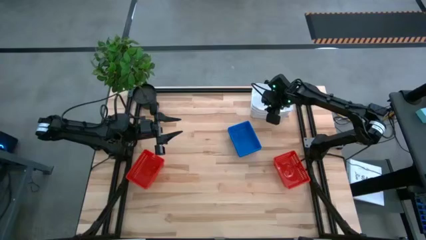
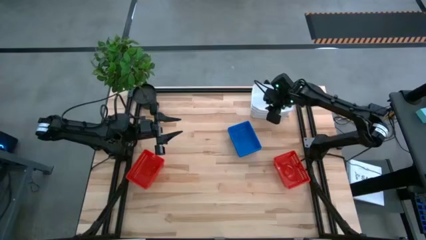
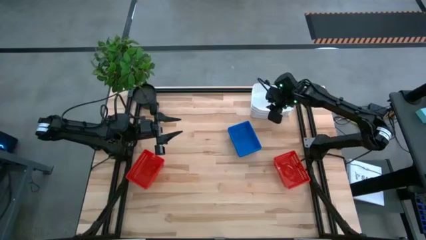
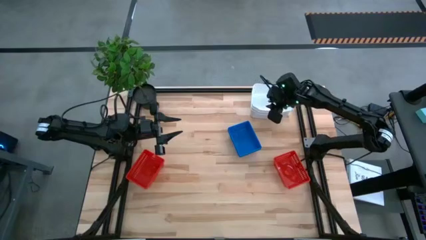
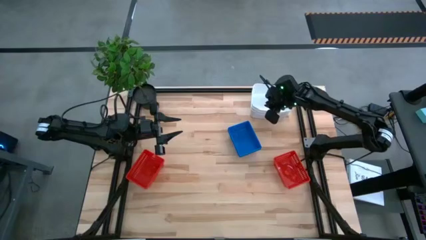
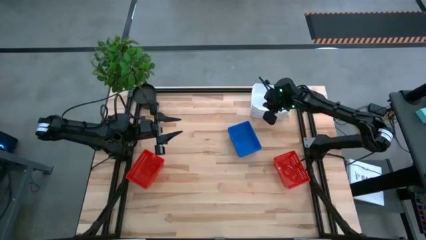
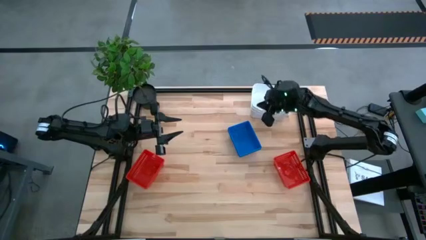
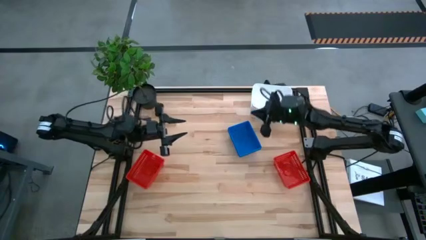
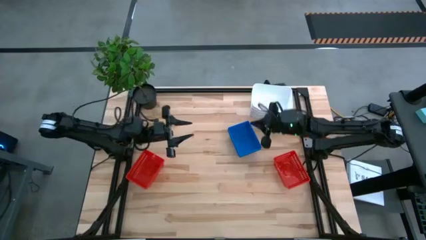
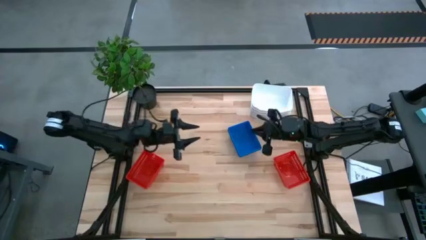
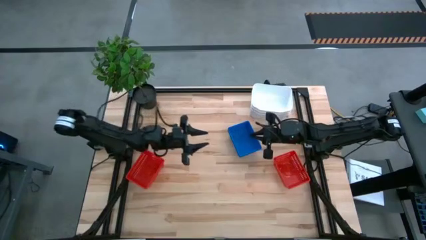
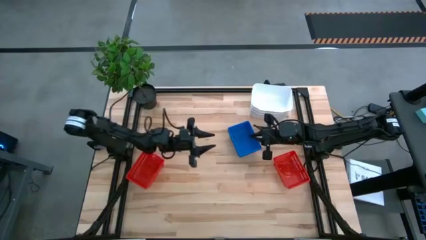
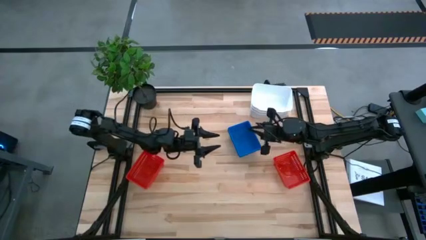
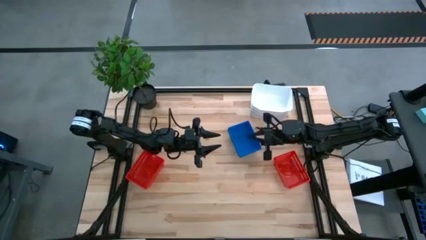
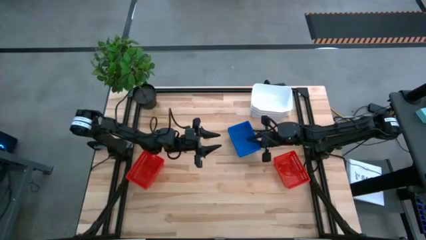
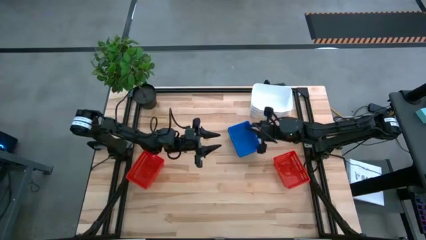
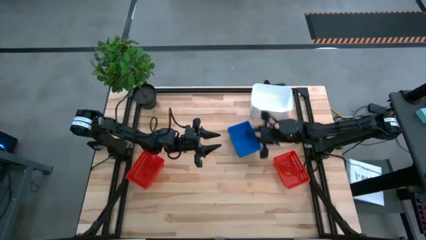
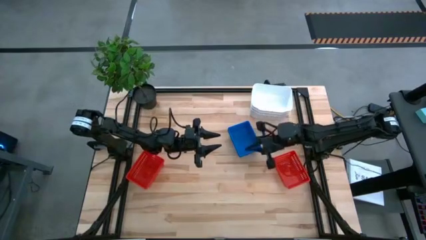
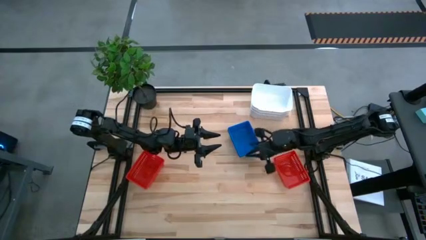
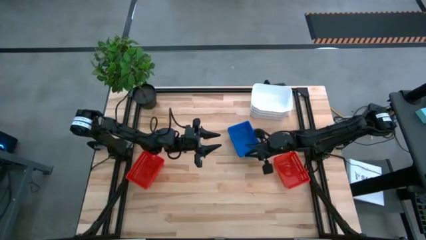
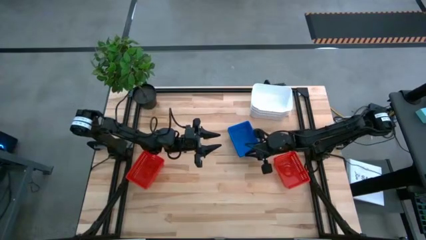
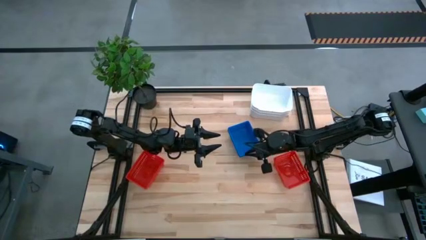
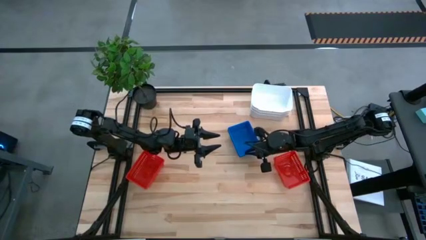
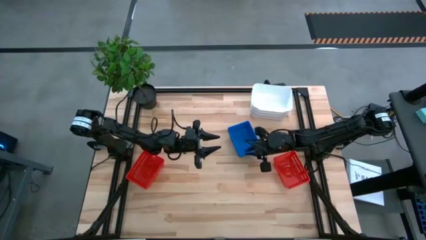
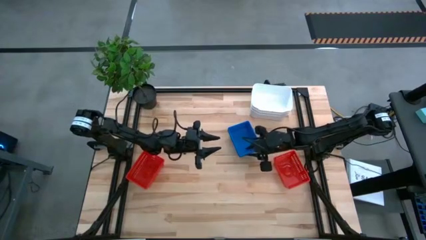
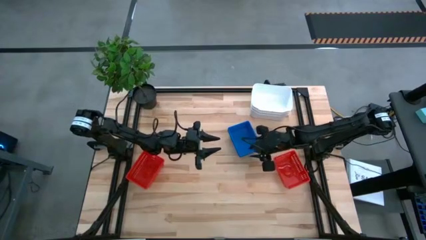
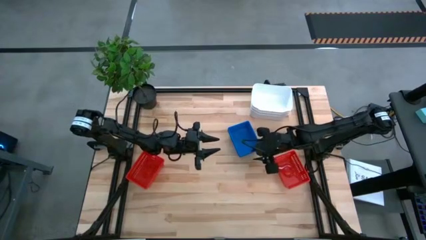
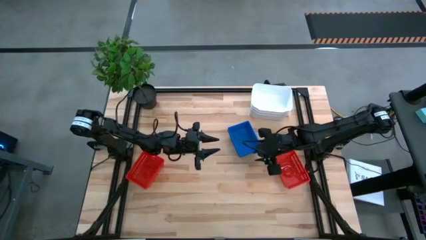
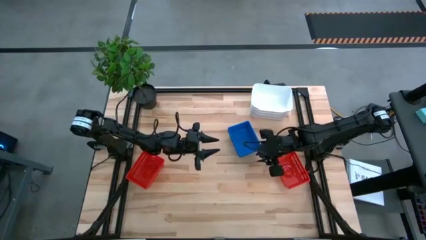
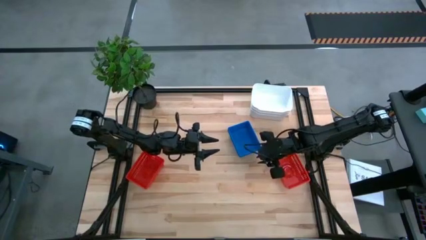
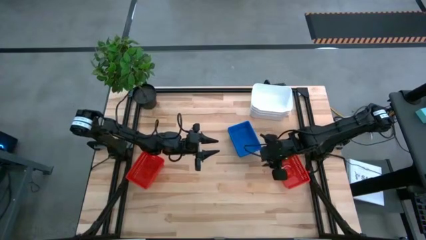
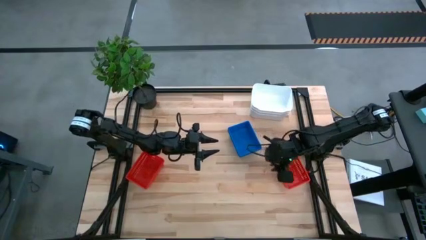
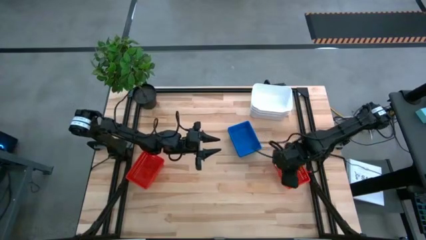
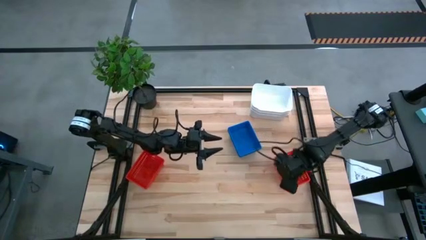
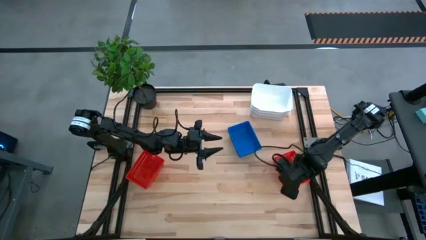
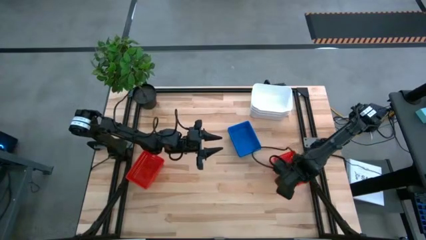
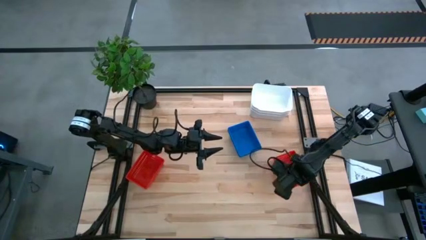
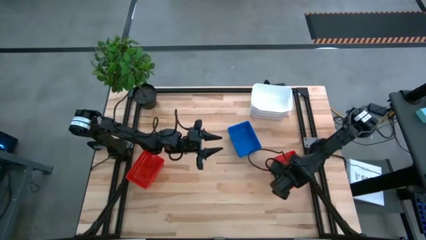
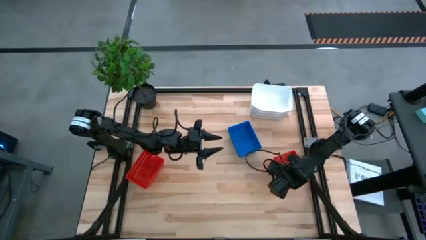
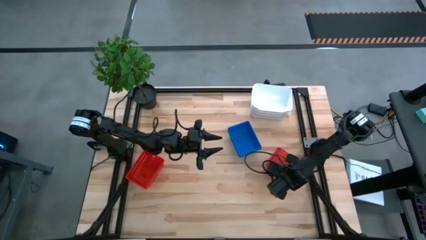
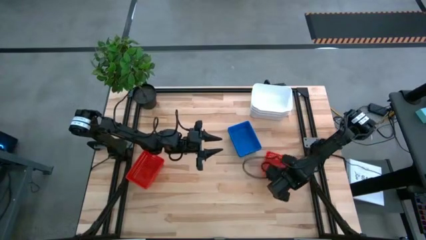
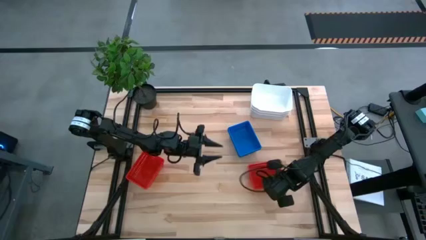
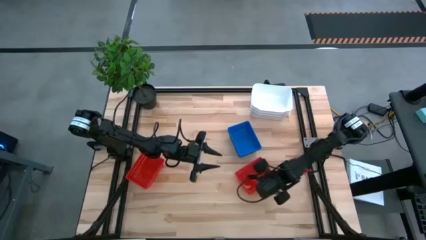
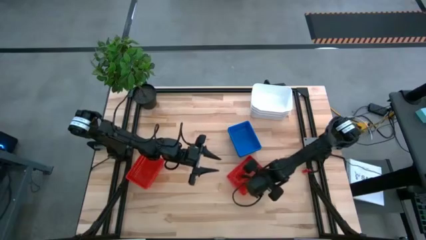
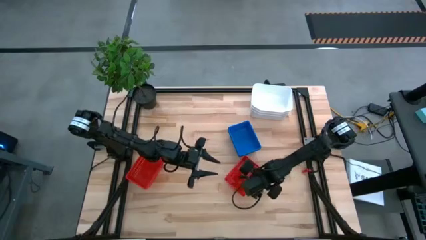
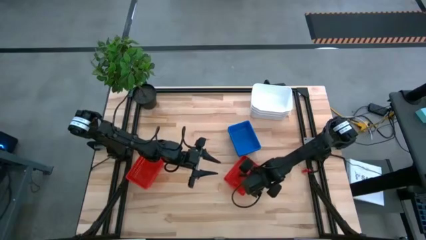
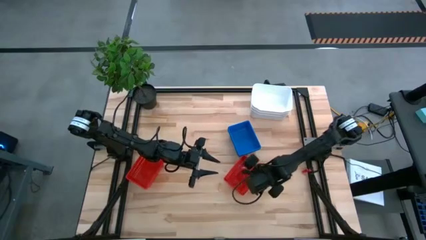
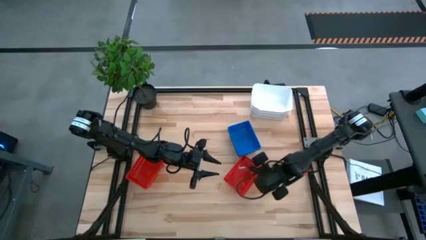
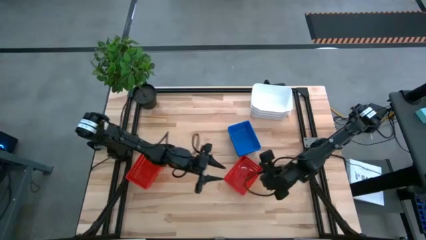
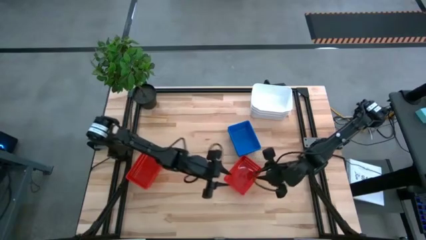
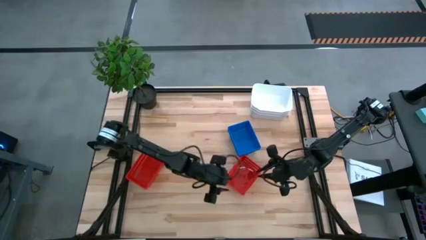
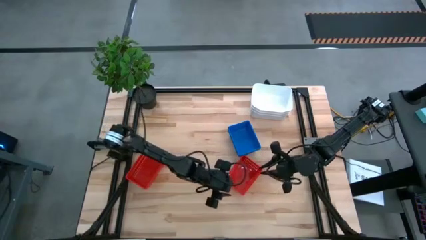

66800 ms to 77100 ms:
Stack the right red bin on the stacked red bin
